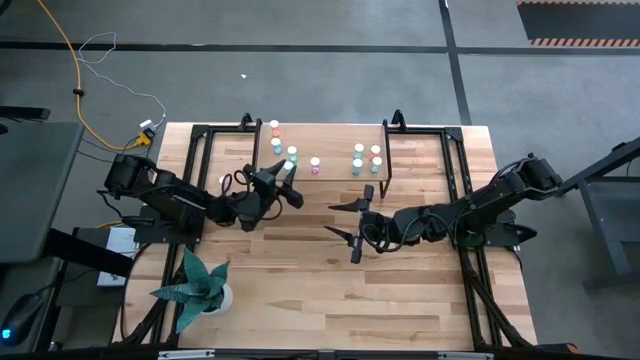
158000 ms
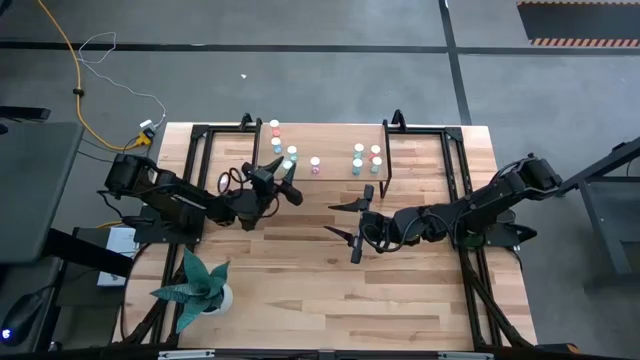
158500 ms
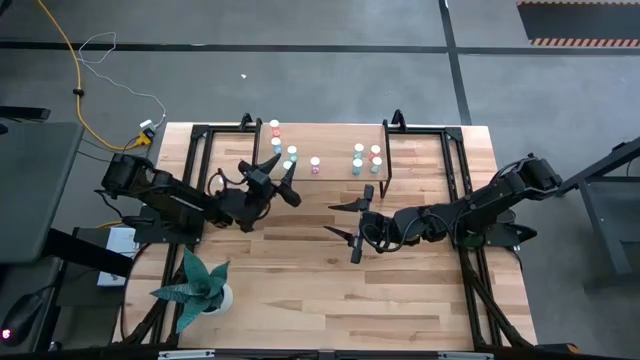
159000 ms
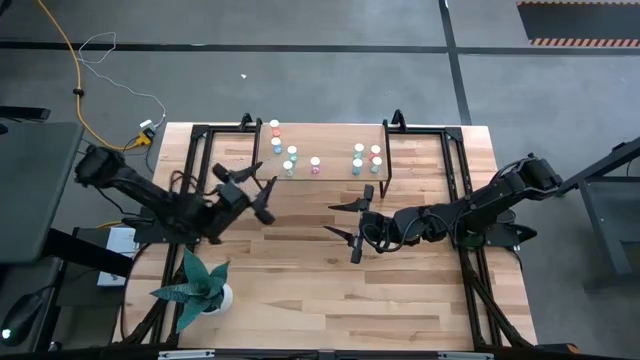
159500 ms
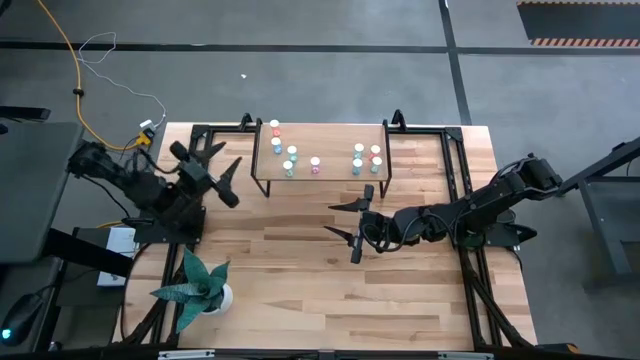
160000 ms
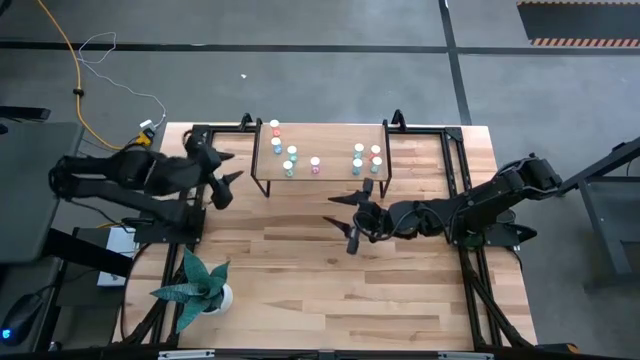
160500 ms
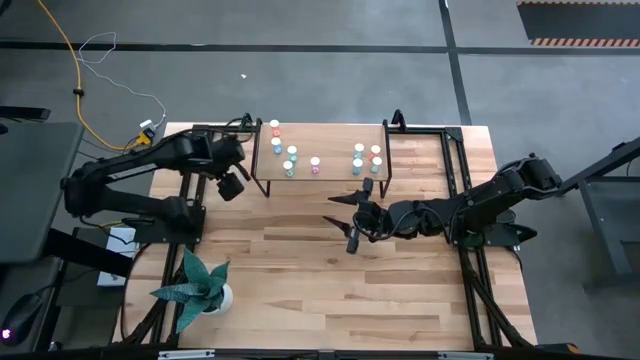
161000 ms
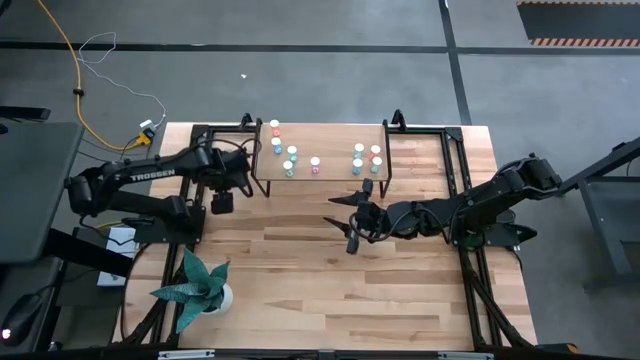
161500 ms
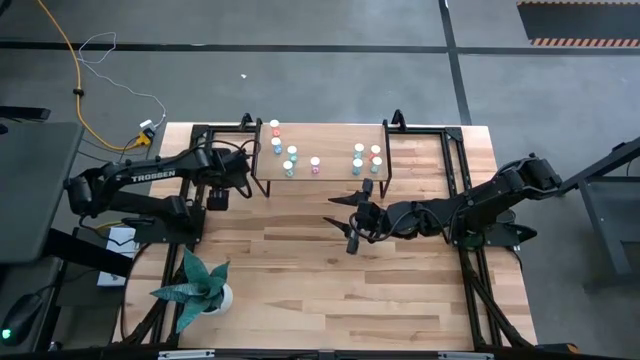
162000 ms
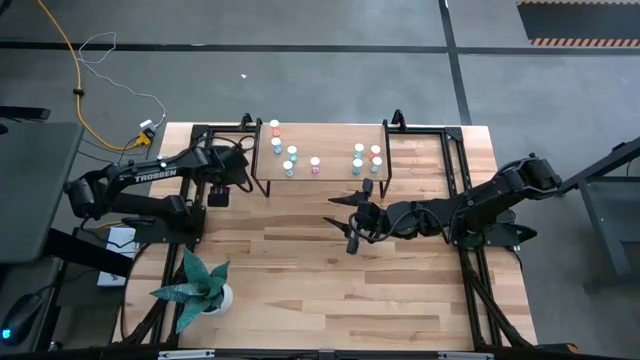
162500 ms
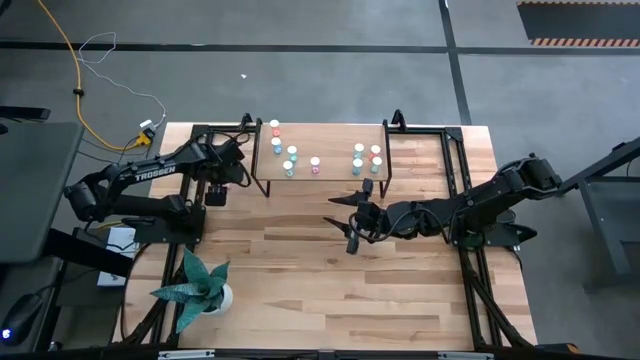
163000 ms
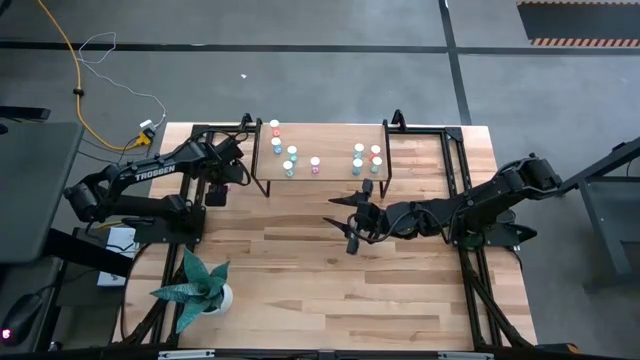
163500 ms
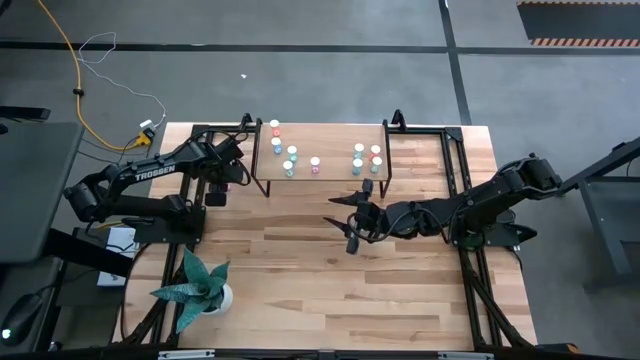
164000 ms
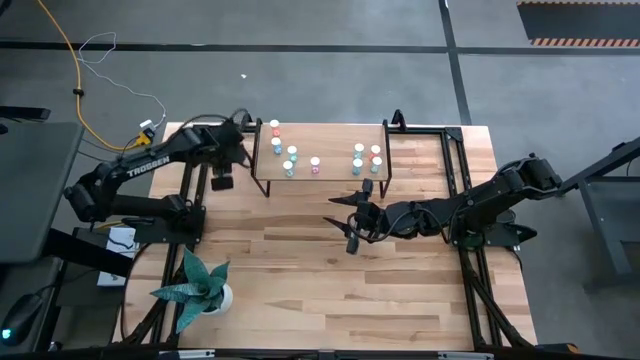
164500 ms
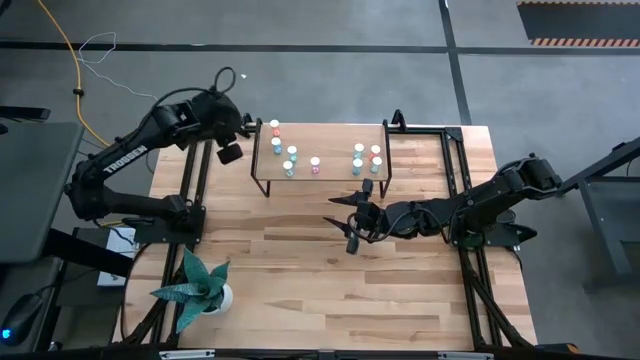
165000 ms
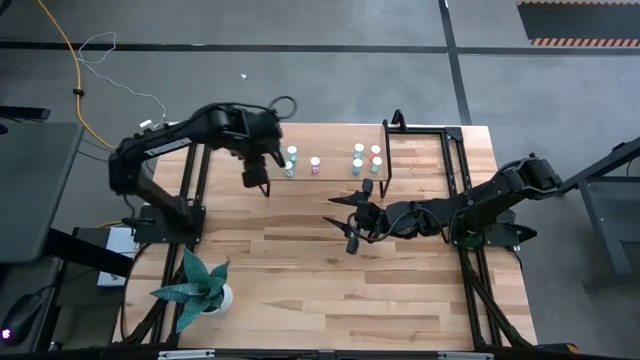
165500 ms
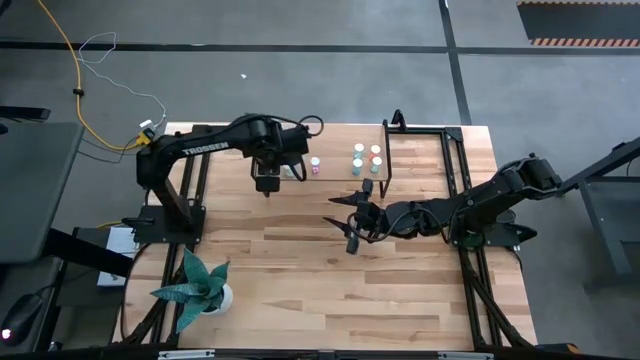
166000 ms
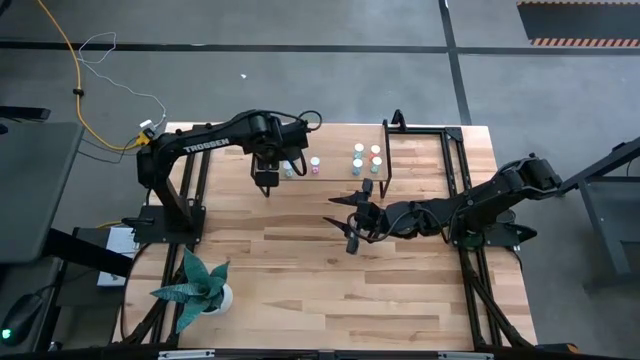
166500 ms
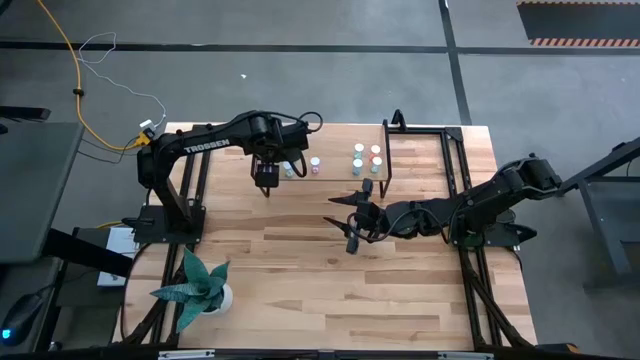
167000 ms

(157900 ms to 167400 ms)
Task: Pick and place medicine bottles onto shelf by color
Put the pink pill bottle on the shelf

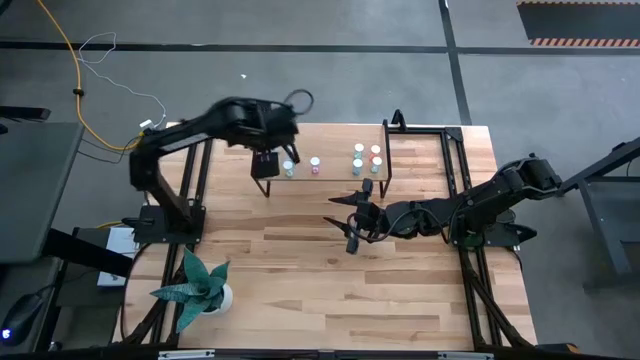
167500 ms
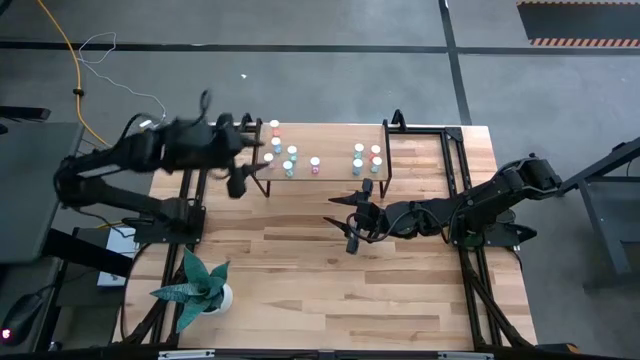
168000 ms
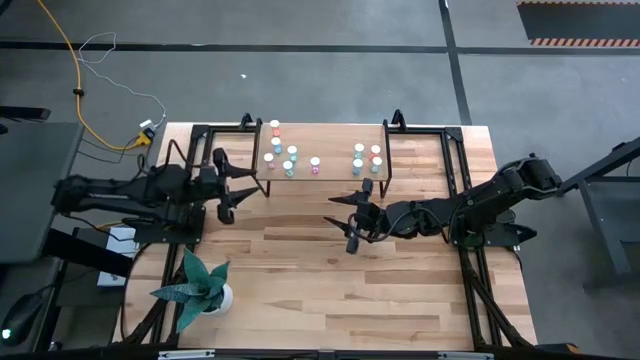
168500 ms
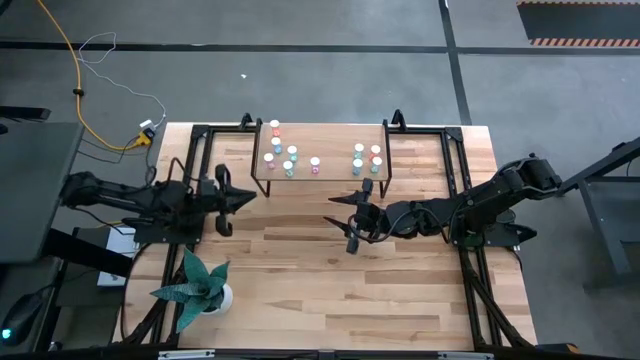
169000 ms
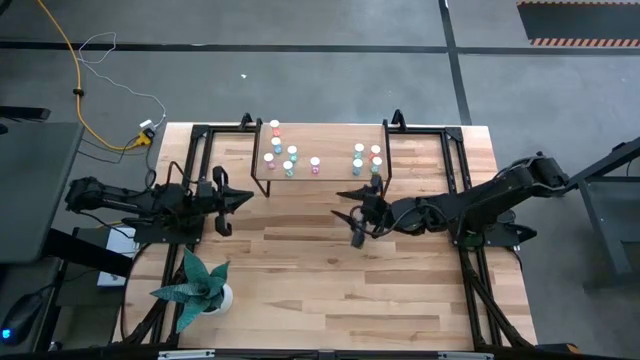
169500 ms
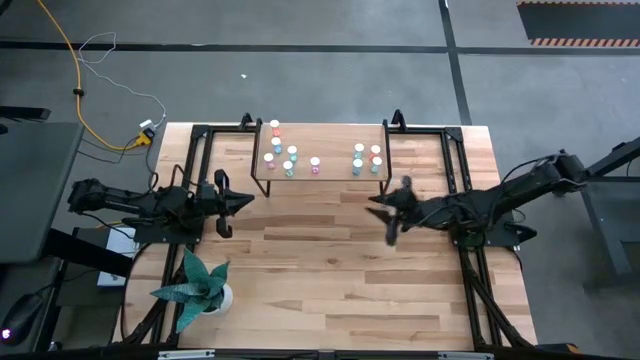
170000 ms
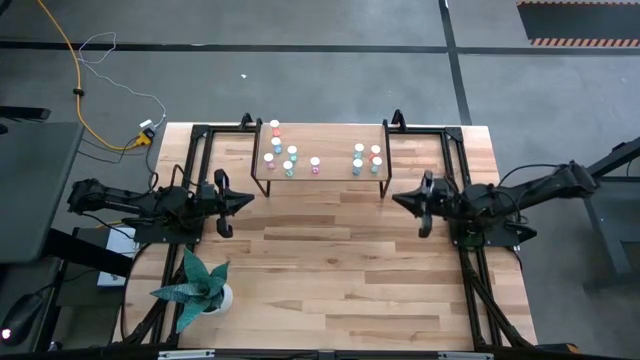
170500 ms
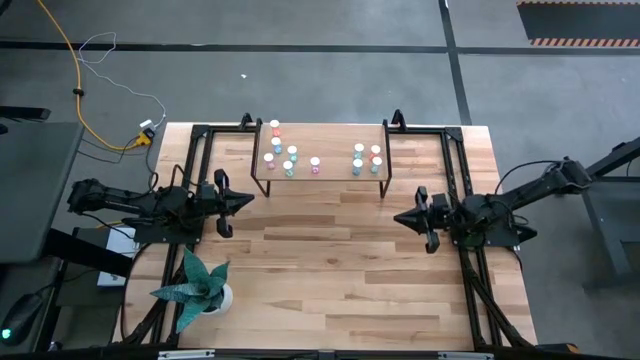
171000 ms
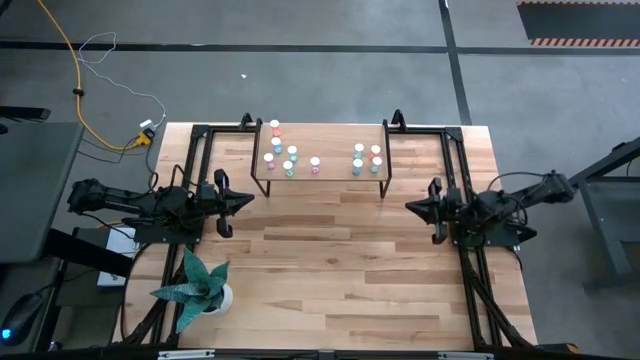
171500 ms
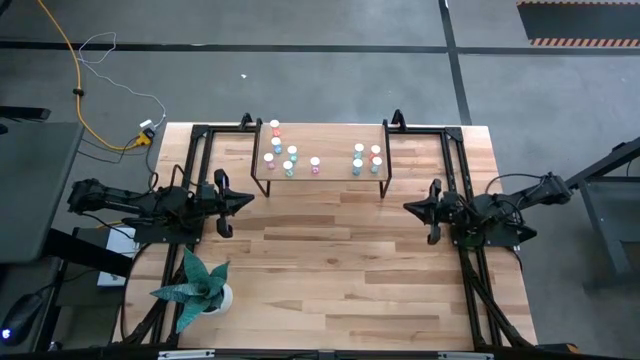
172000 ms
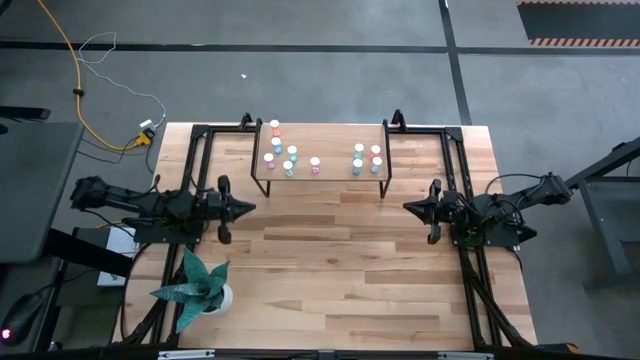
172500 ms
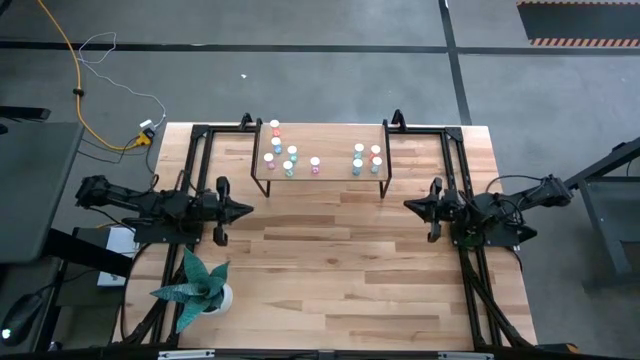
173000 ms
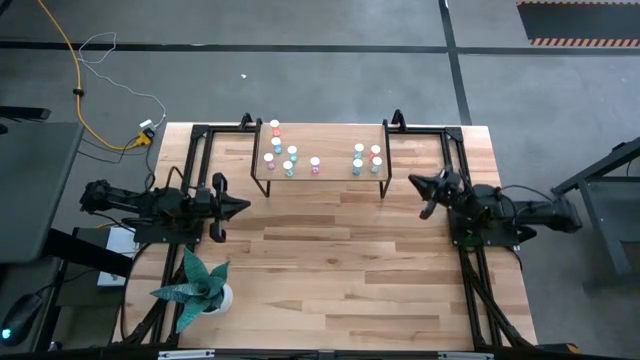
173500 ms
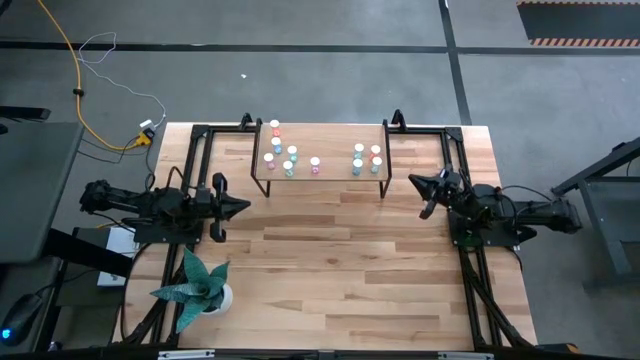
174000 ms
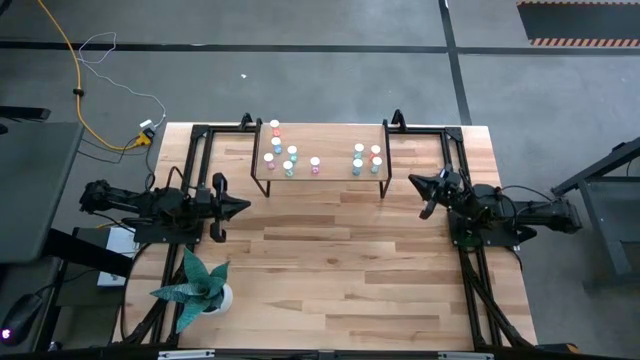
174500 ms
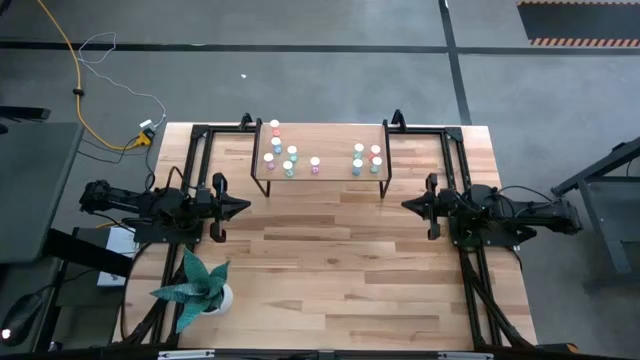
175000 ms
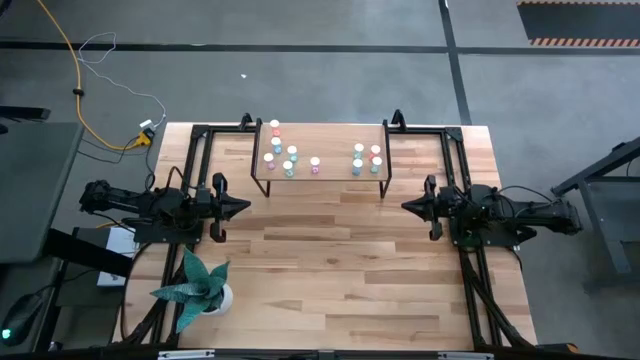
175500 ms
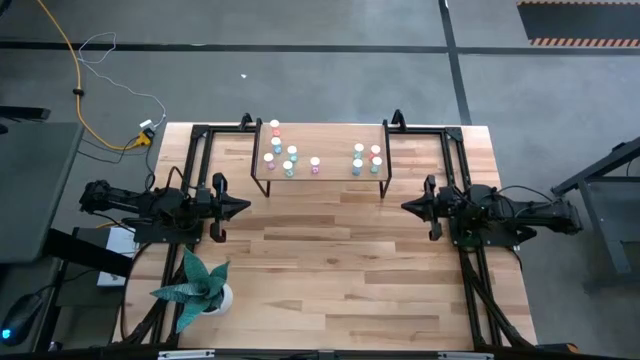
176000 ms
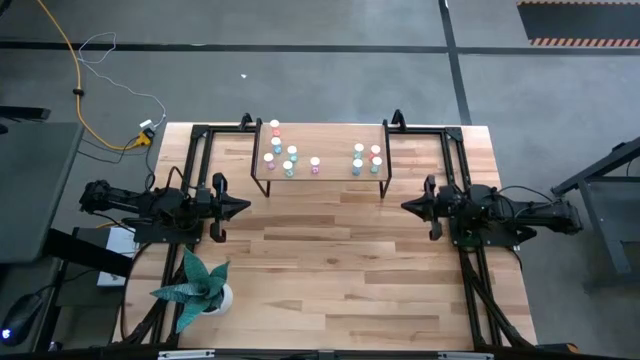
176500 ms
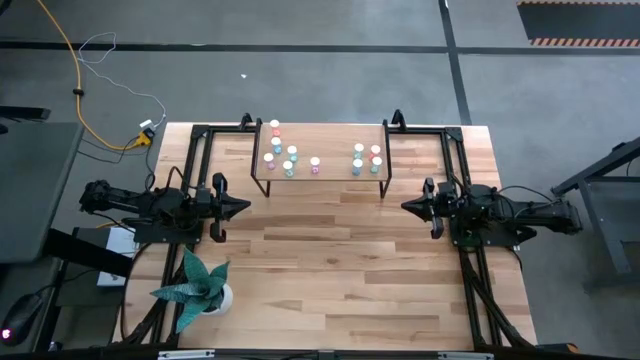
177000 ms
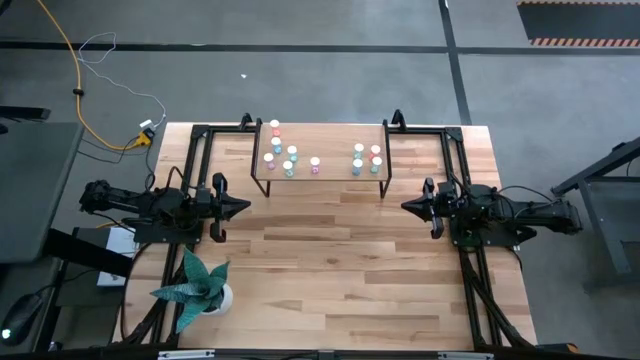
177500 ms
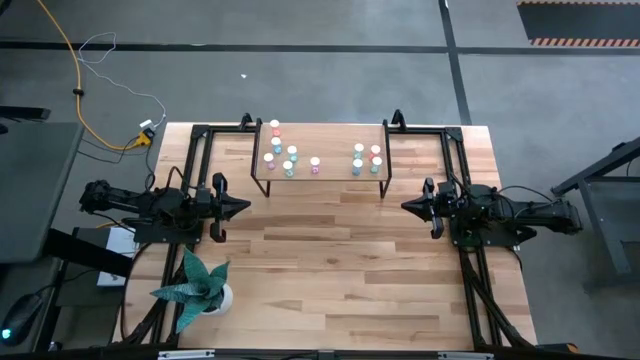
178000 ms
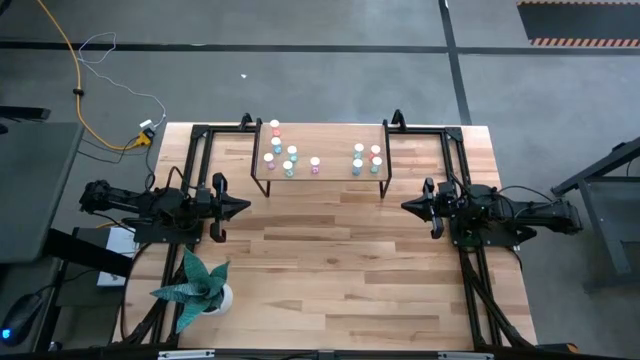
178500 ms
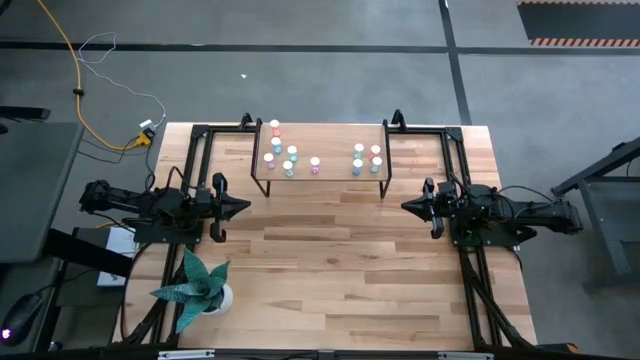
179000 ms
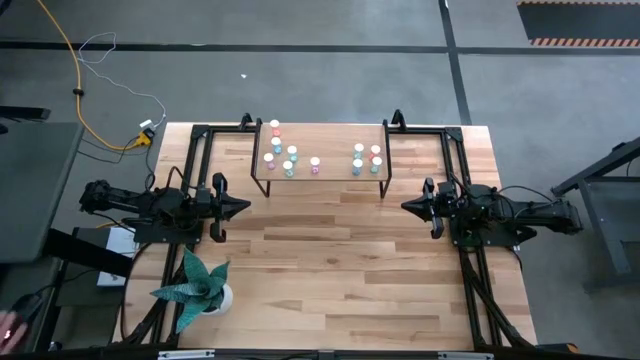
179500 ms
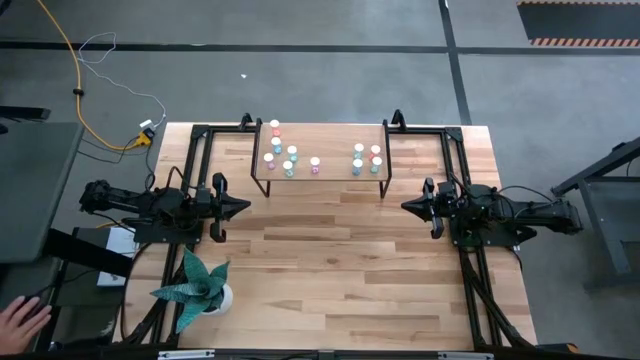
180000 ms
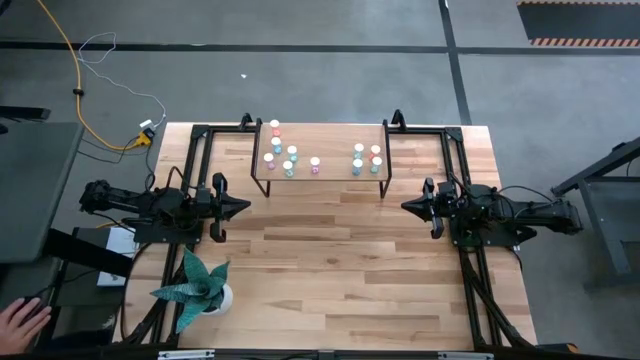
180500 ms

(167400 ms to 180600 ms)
Return to Home Position
